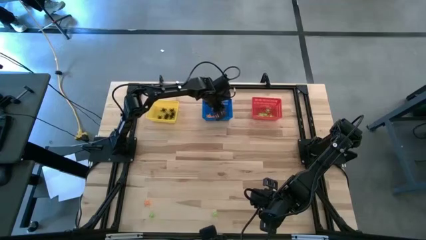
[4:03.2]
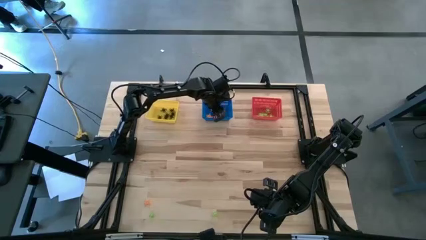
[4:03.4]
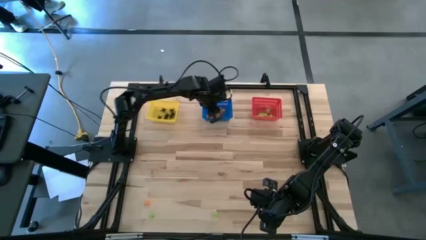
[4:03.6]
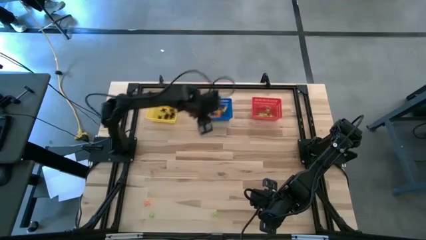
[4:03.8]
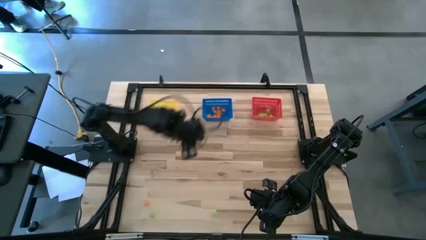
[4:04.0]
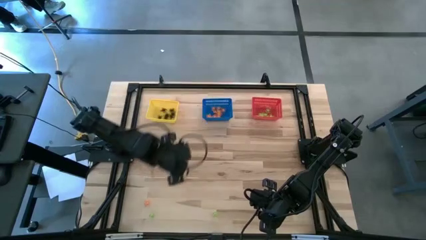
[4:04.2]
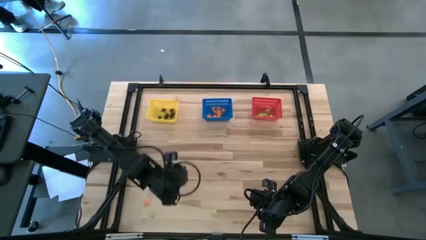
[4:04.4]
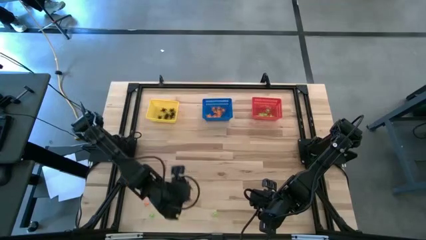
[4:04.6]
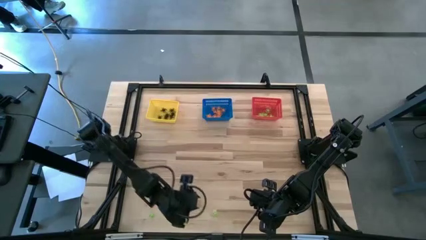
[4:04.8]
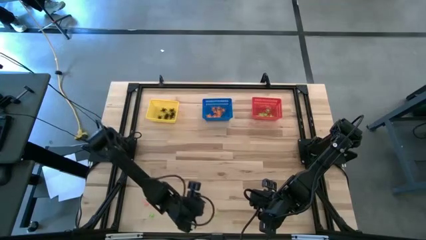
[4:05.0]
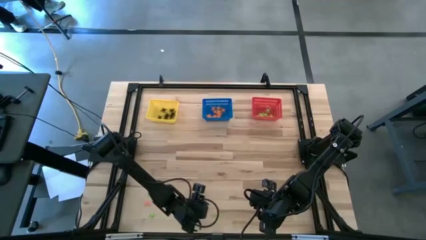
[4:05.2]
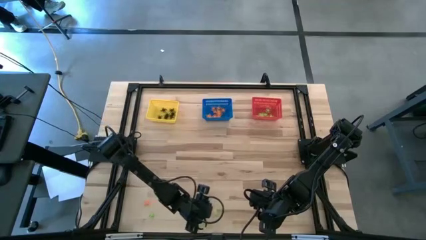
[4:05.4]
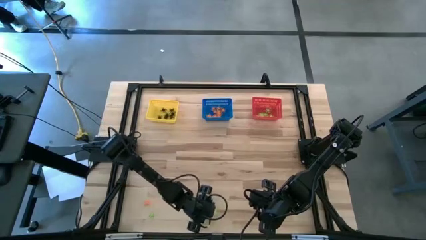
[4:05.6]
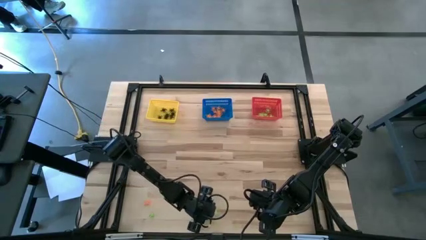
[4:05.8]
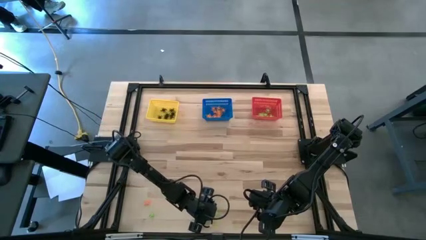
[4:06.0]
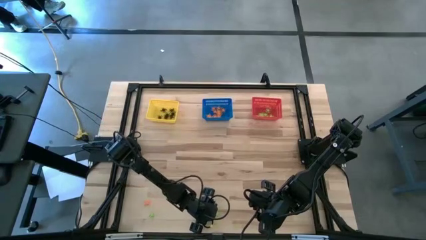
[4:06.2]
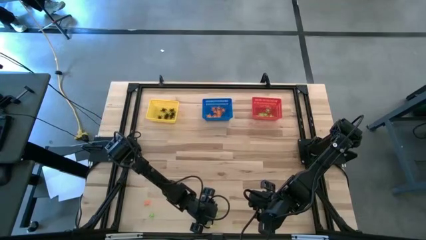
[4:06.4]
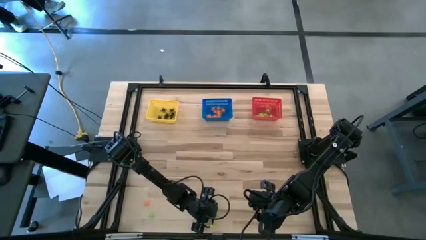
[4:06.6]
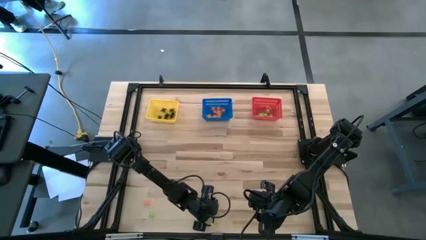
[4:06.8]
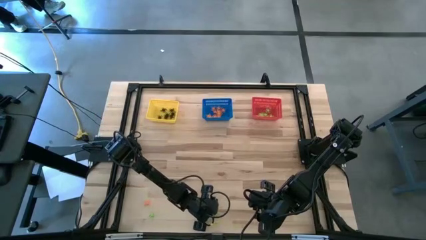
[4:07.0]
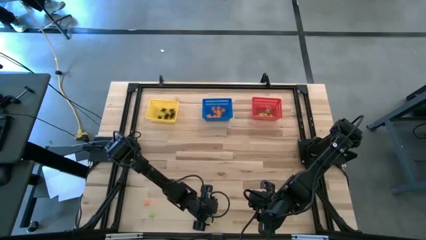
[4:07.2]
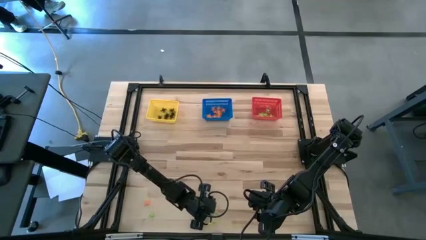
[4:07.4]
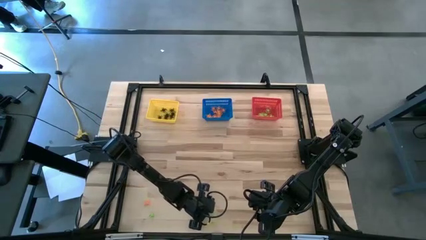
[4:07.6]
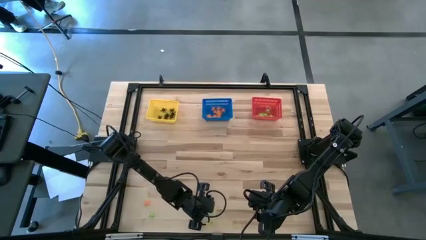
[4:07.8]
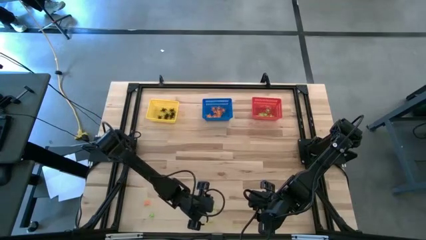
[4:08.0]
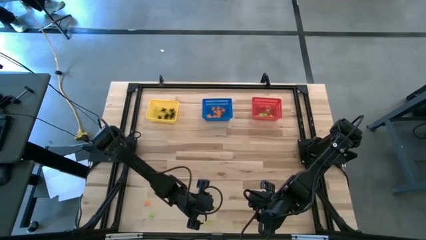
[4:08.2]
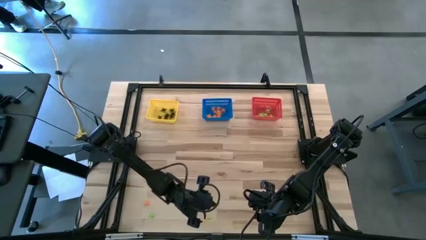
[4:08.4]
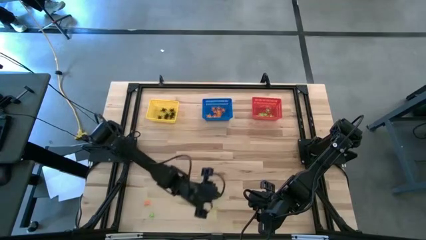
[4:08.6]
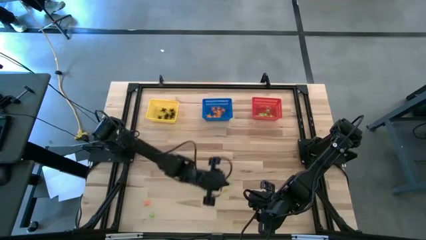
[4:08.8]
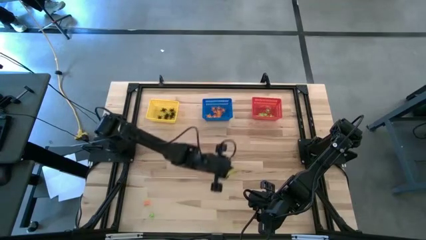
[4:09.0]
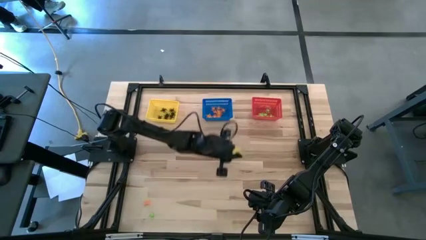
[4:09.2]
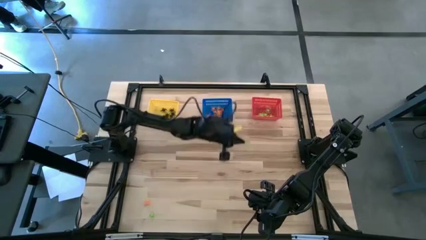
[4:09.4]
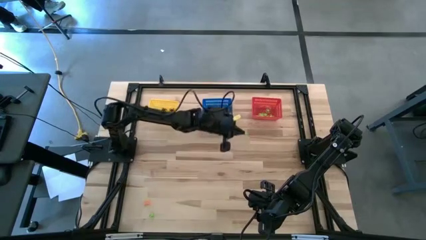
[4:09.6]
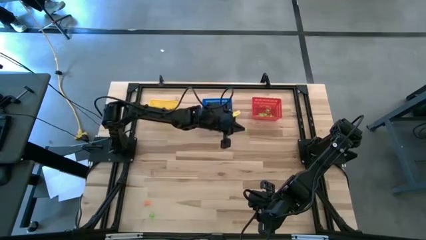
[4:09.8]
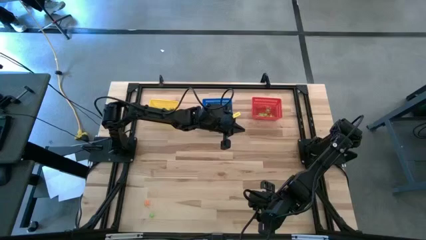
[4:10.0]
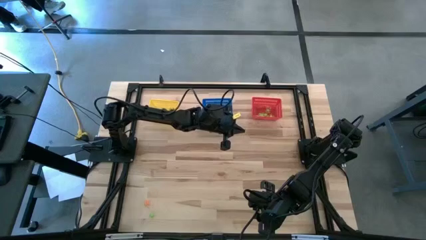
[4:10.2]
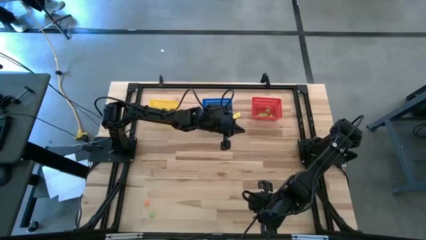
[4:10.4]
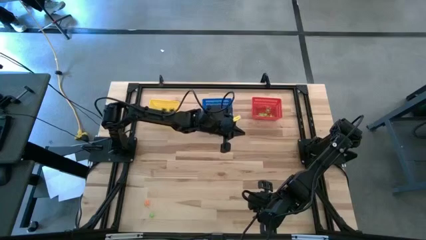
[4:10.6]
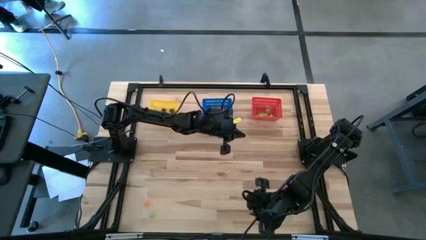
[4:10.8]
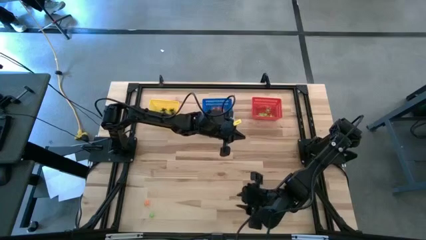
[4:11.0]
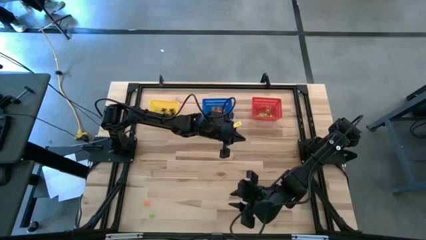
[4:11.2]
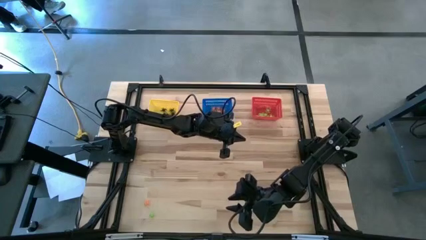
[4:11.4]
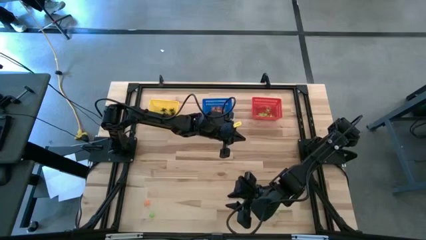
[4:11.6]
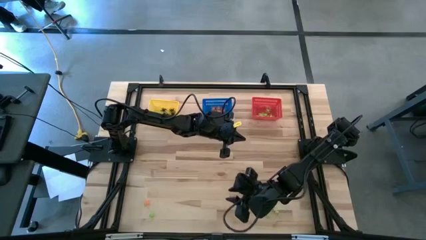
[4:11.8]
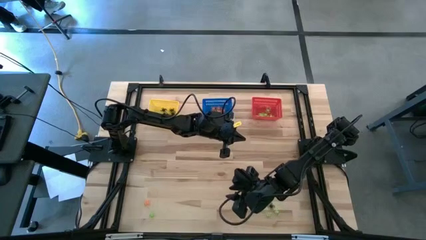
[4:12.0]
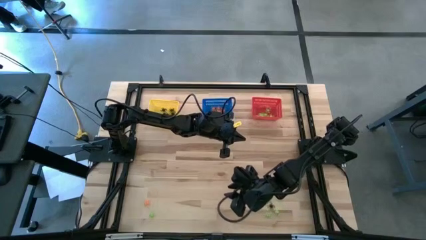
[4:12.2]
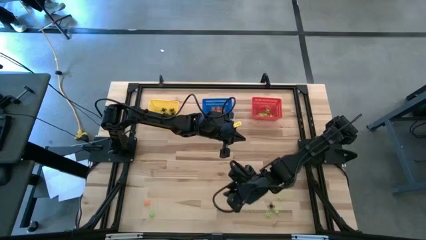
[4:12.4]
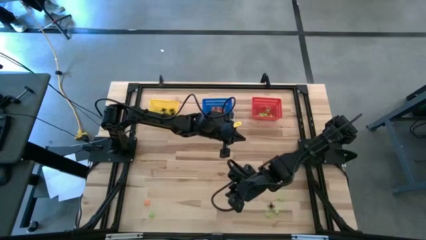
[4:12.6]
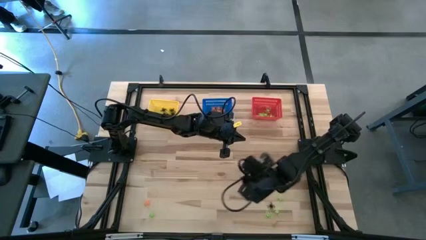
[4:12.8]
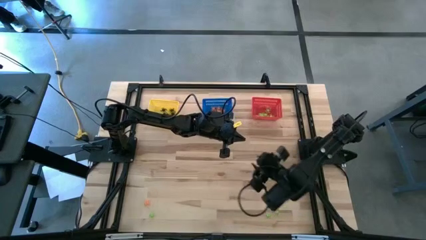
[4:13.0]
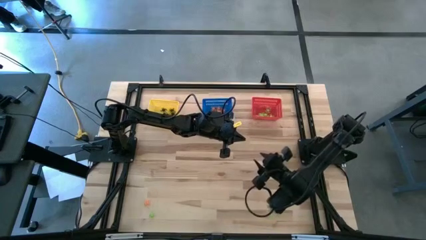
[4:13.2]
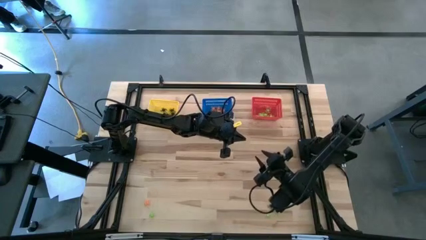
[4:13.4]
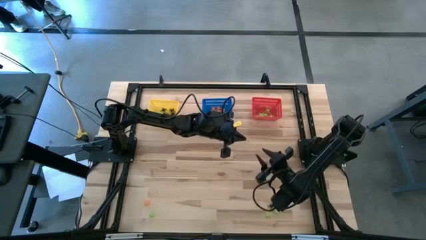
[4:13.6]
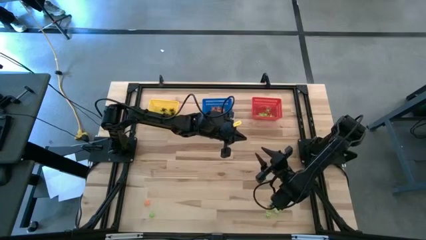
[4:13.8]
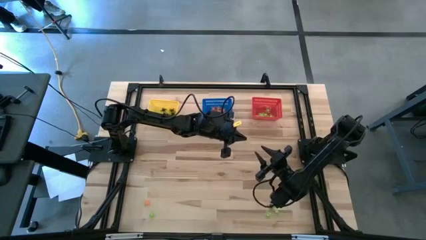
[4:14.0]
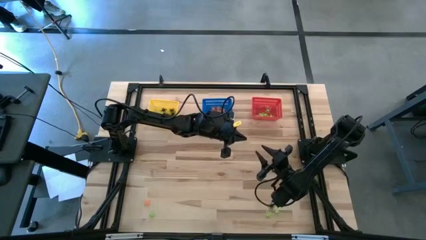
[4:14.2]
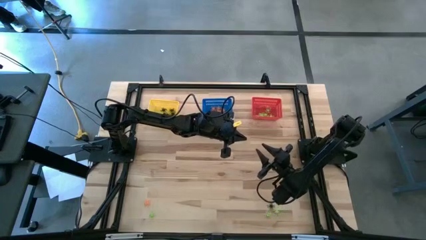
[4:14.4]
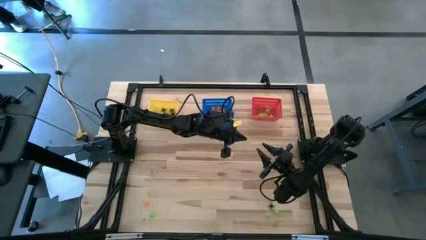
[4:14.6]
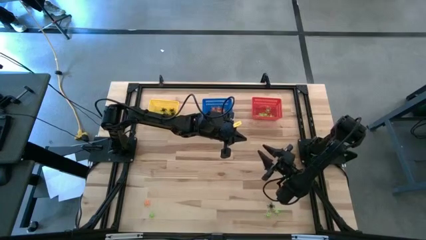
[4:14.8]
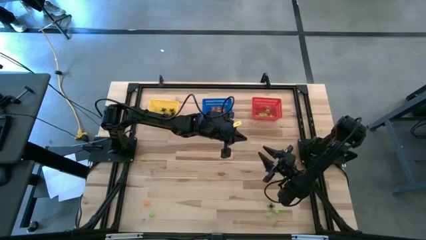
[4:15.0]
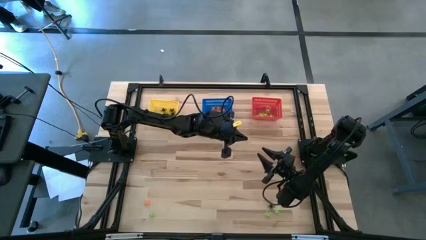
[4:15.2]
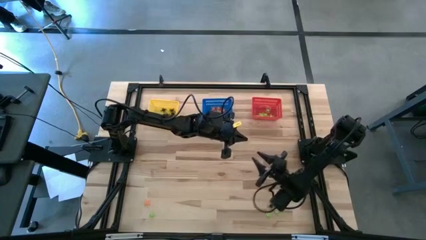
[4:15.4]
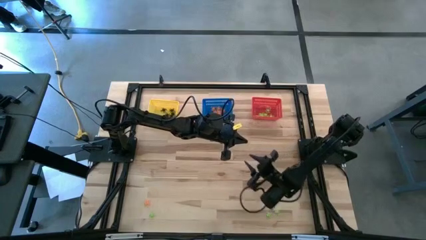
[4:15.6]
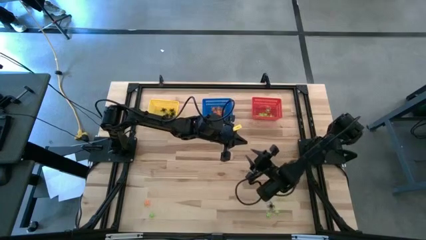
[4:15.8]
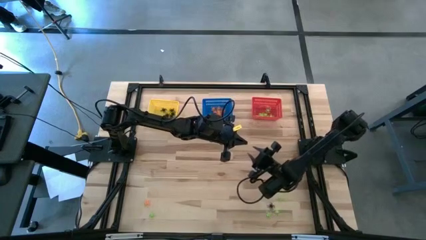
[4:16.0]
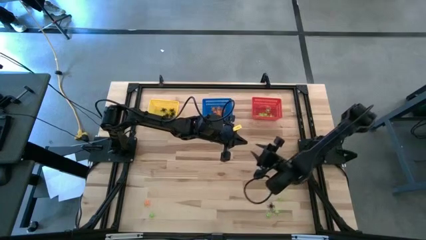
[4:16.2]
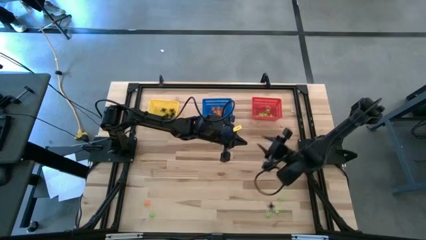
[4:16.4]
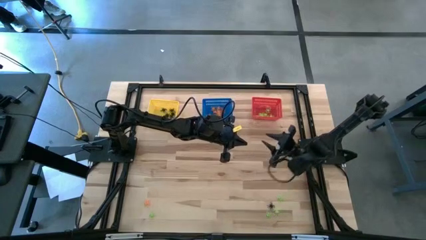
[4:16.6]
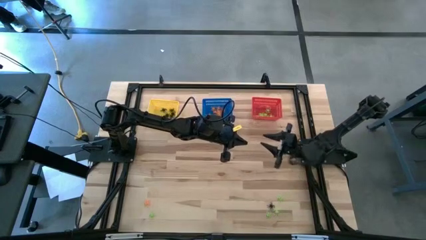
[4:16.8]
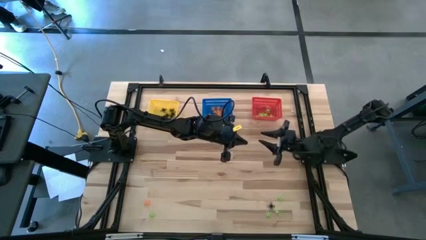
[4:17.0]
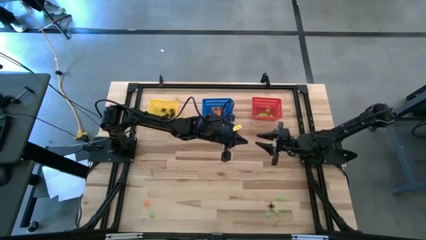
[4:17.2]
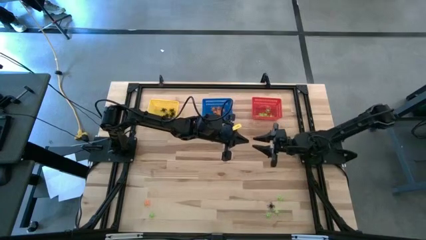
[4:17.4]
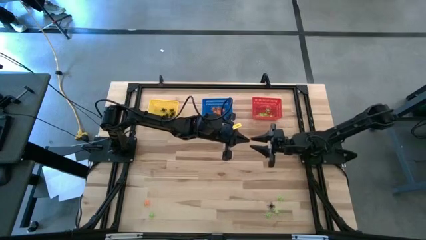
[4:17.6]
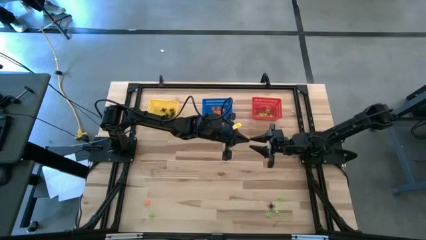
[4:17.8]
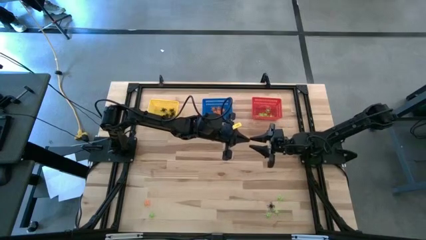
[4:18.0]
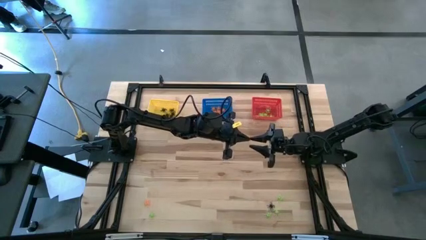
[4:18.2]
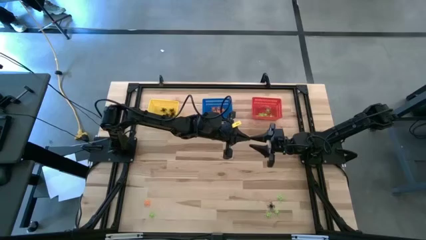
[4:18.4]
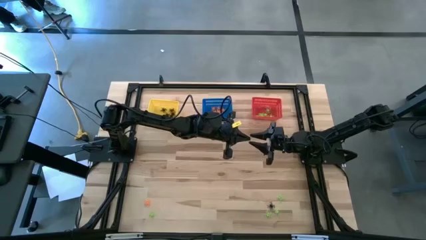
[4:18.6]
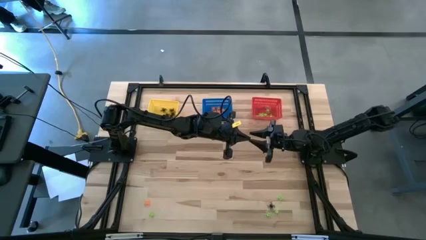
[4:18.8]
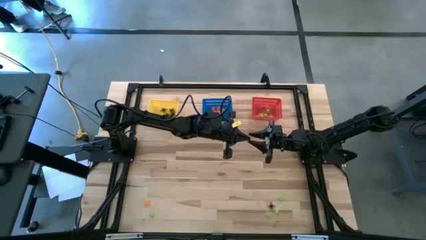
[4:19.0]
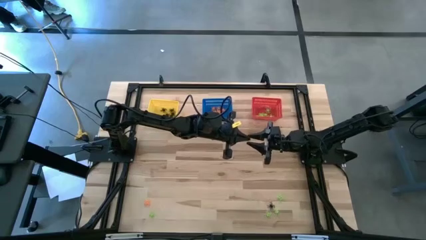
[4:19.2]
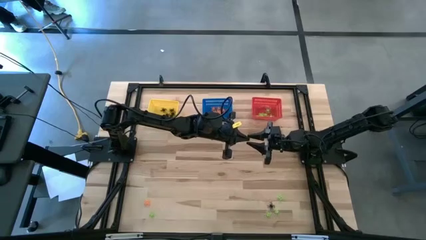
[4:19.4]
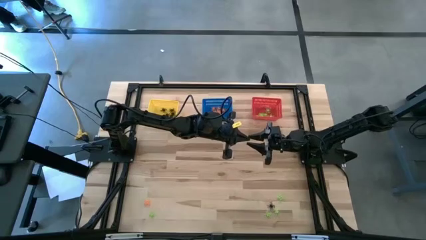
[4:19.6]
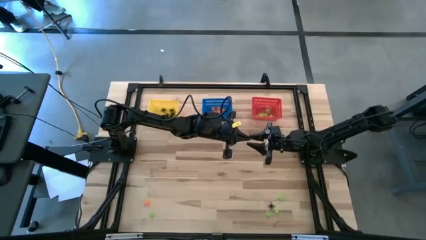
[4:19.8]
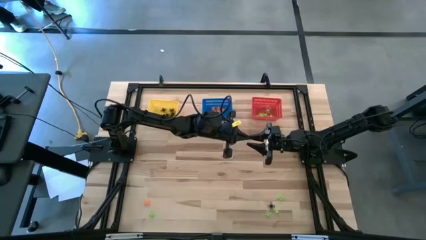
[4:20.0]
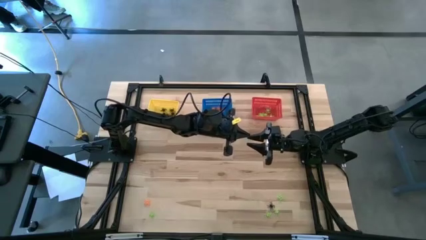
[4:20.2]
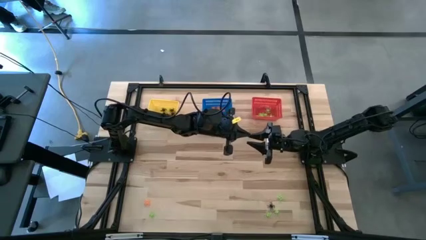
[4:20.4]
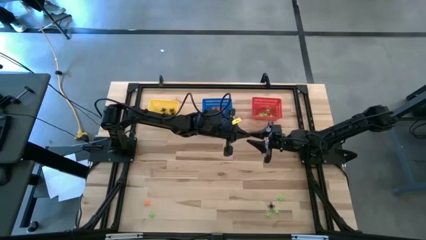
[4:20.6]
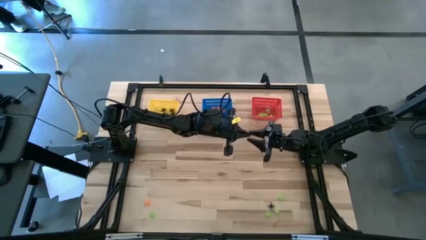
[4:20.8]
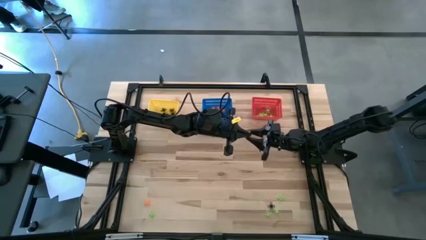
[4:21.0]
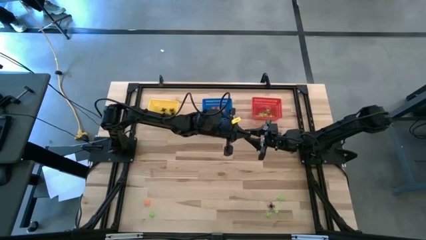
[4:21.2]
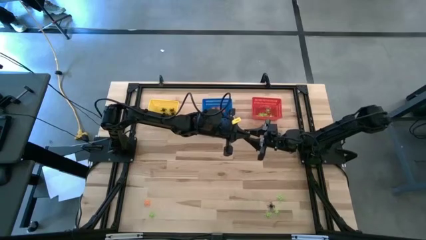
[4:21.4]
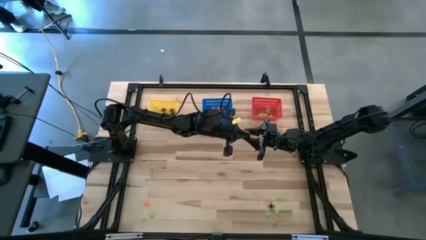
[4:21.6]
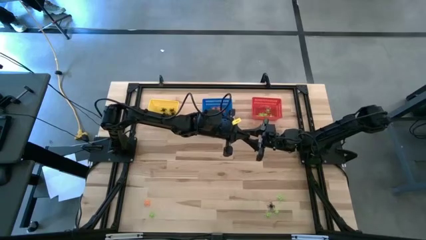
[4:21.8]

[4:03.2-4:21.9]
Task: Sort Halloween decoration
Put the green spider toy into the red basket
